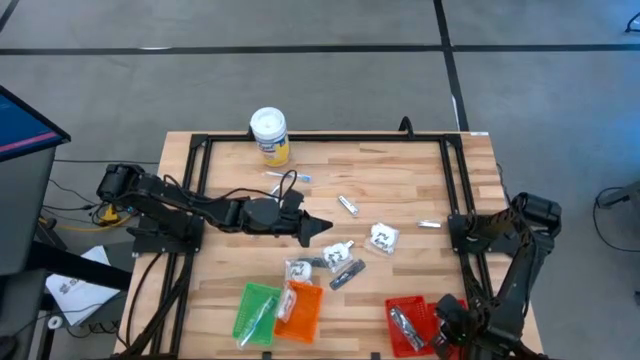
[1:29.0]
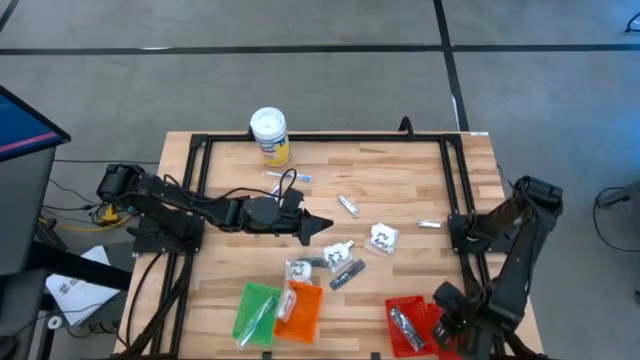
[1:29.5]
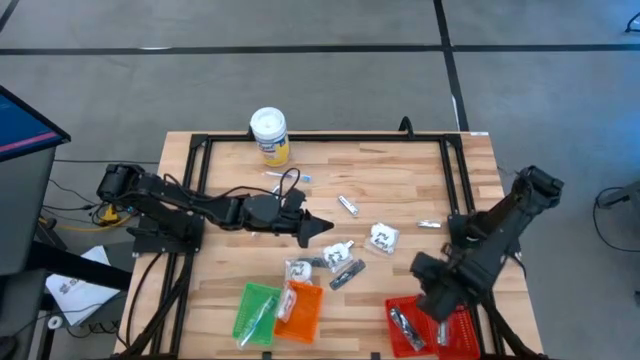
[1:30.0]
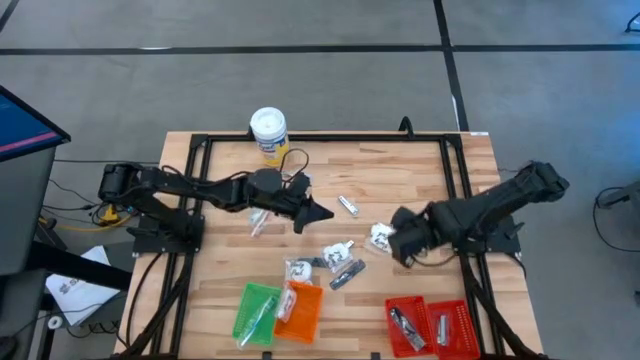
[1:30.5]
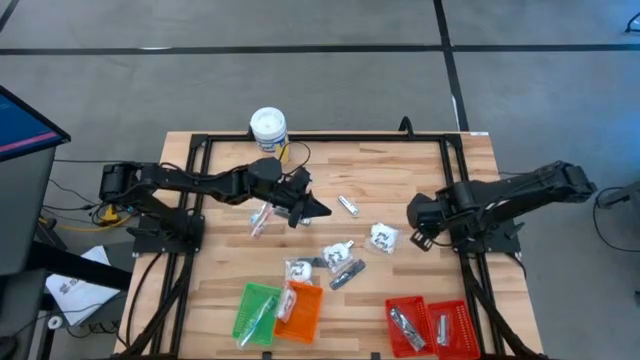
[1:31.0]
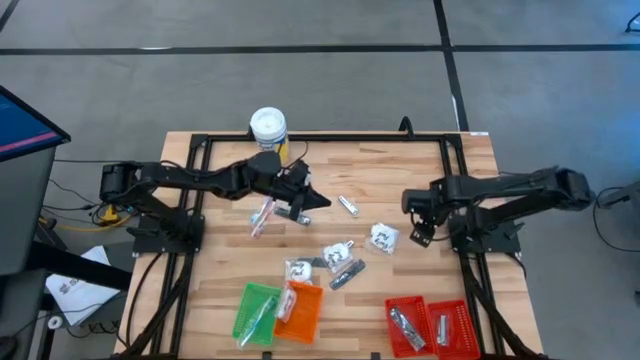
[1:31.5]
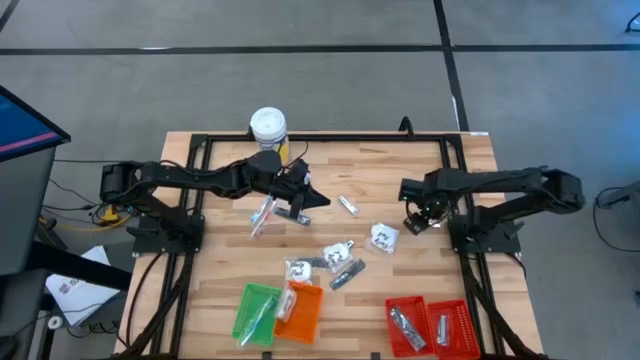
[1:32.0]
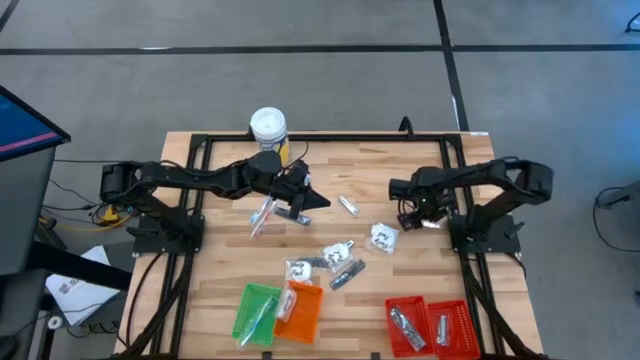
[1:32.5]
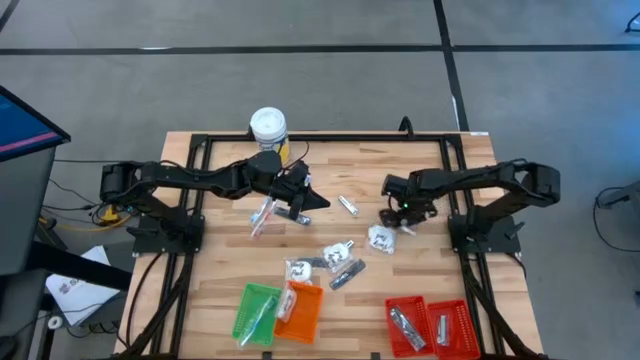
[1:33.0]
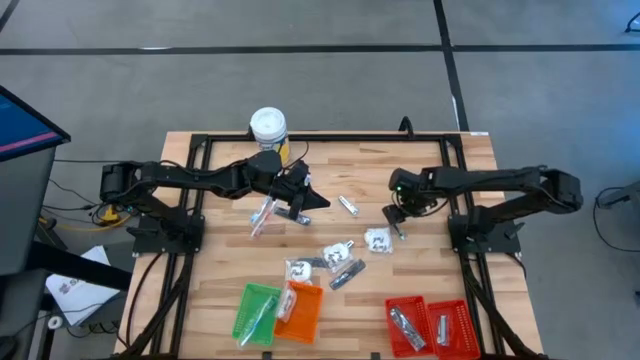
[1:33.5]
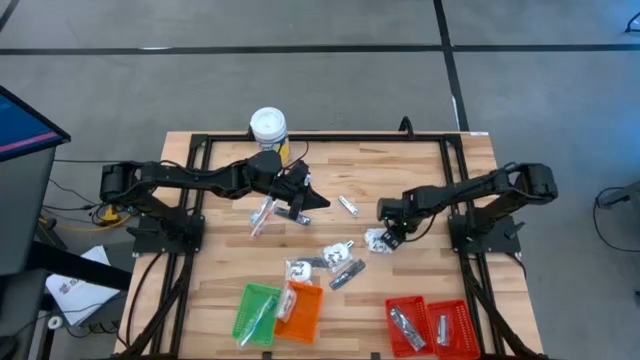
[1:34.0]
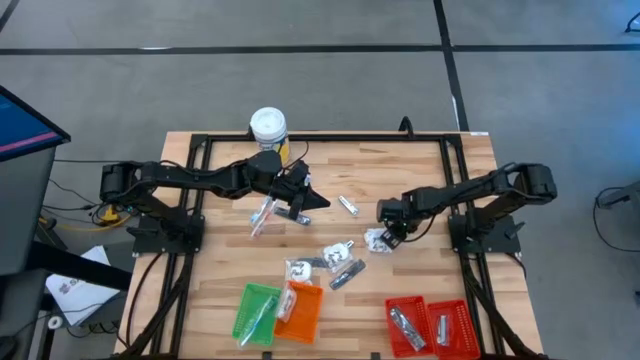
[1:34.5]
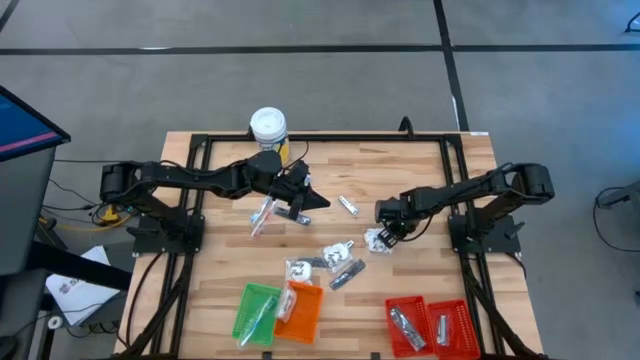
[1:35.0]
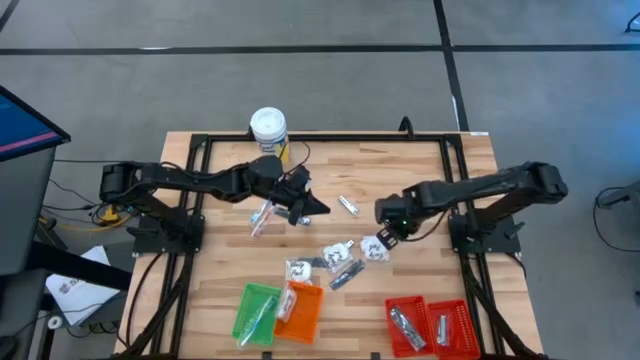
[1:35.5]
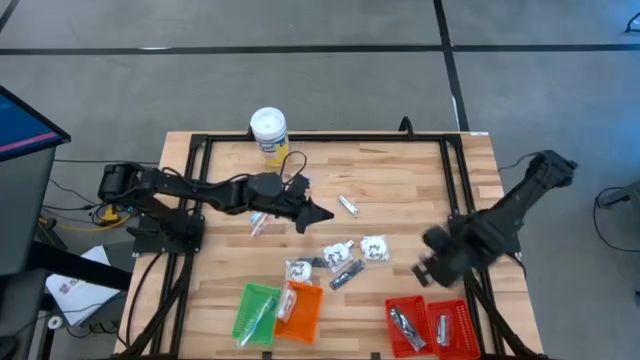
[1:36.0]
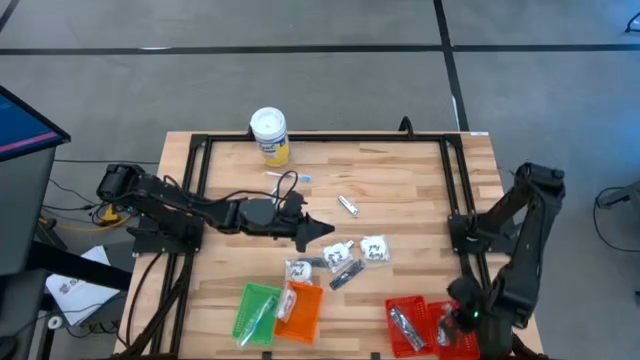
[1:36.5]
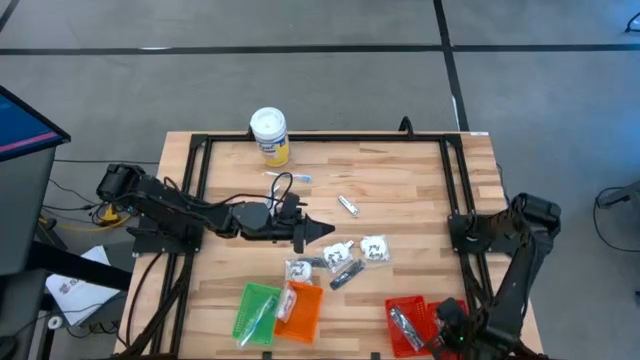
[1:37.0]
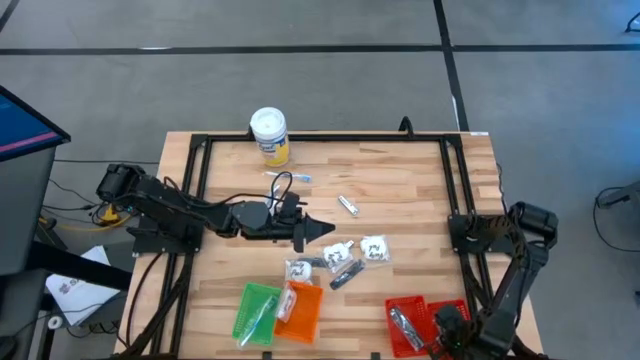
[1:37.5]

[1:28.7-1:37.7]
Task: Pick & Place Travel size toiletries
Put the silver nail cutter into the right red basket

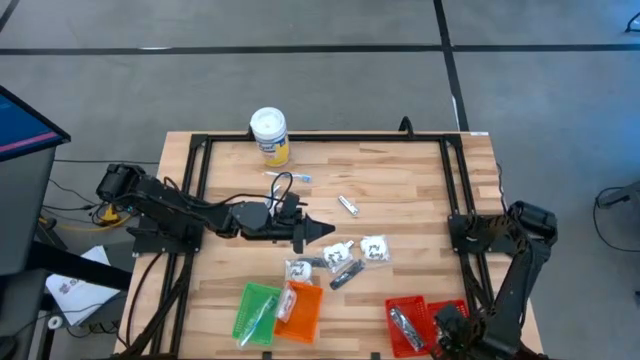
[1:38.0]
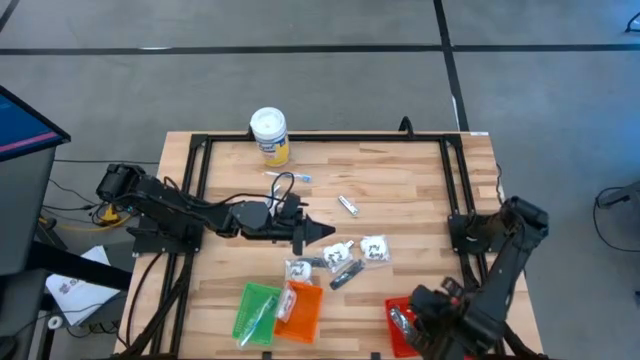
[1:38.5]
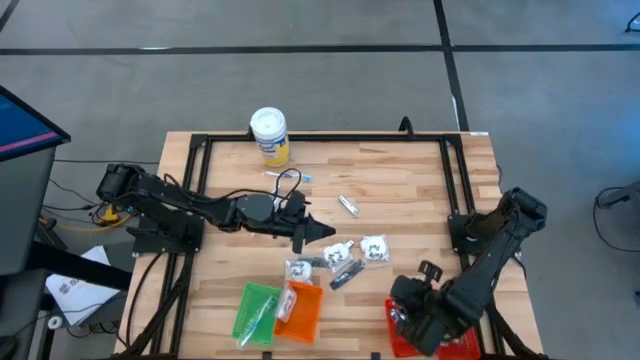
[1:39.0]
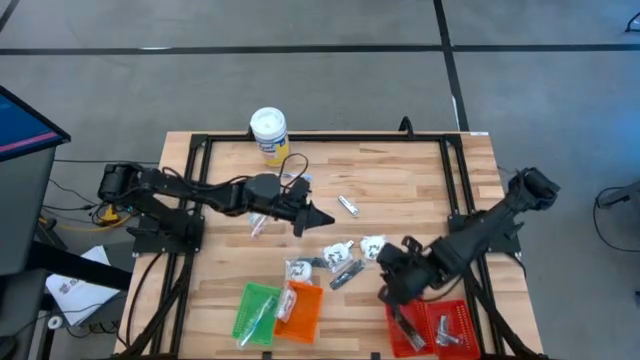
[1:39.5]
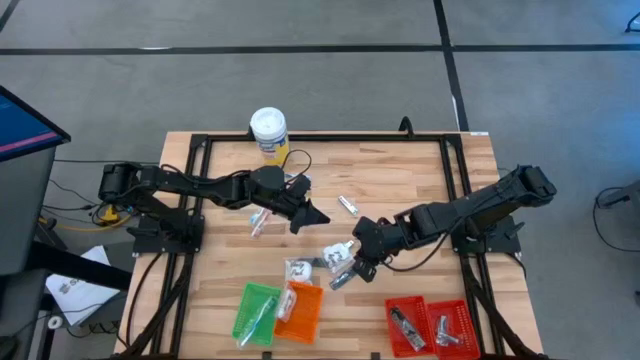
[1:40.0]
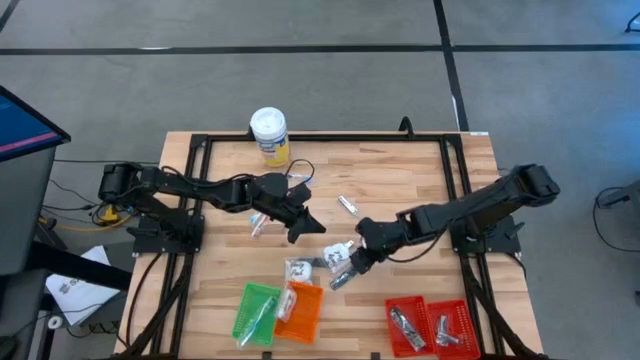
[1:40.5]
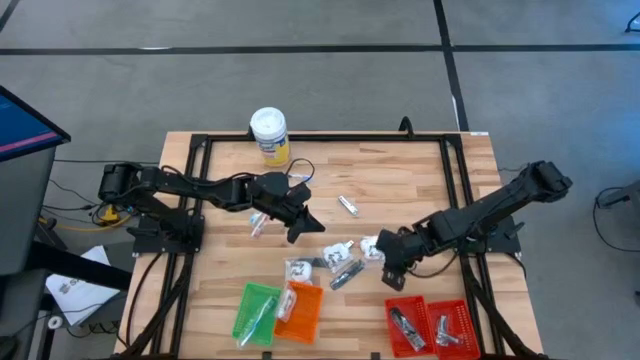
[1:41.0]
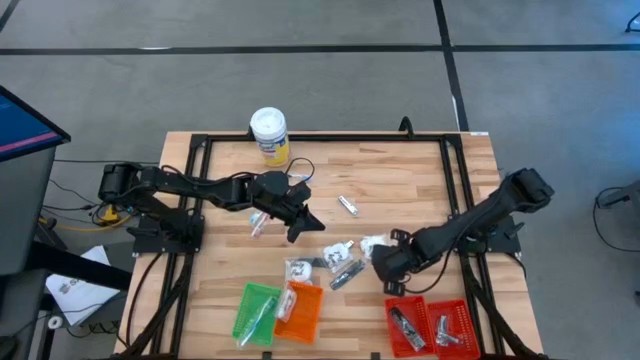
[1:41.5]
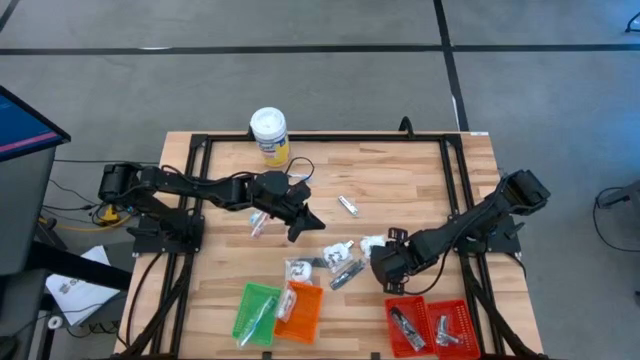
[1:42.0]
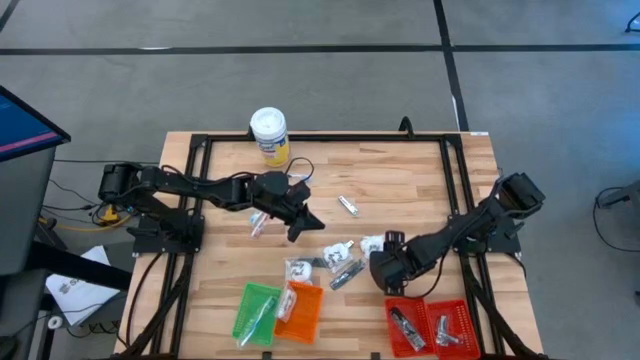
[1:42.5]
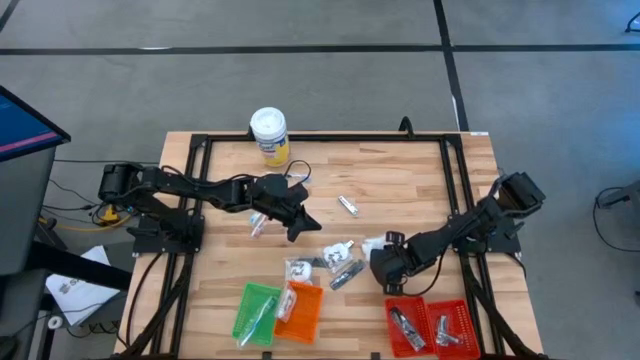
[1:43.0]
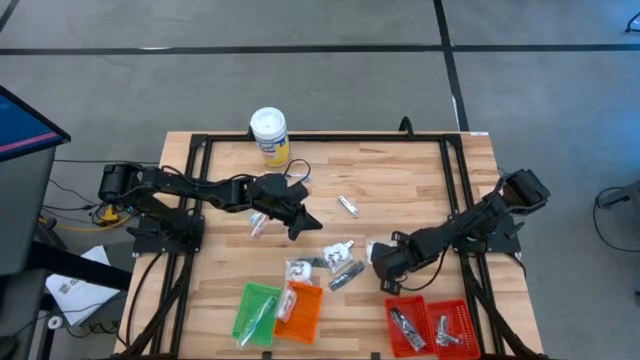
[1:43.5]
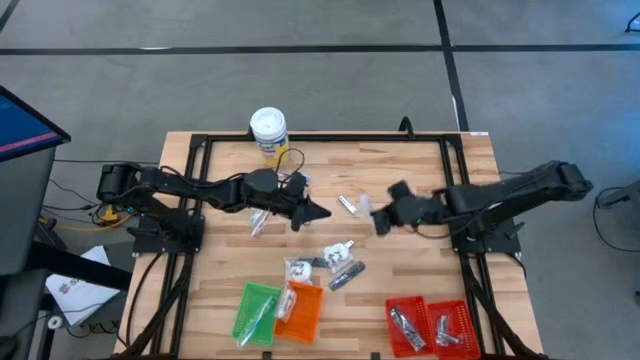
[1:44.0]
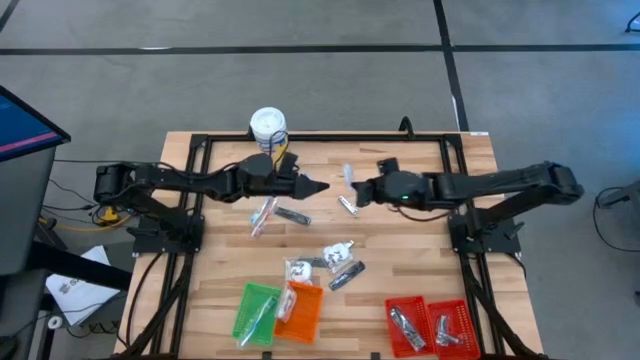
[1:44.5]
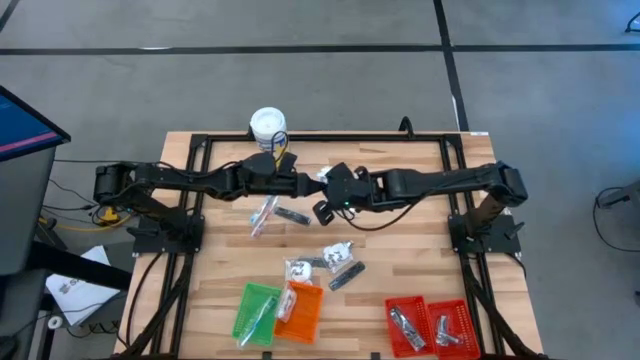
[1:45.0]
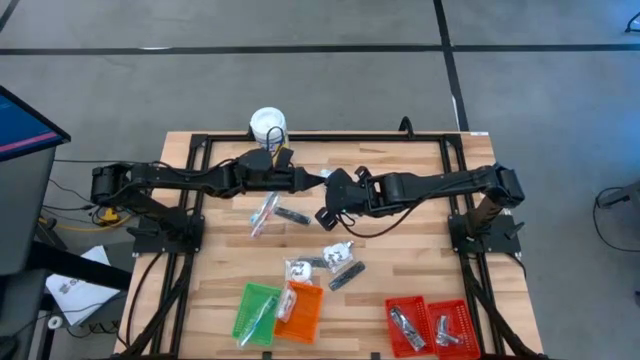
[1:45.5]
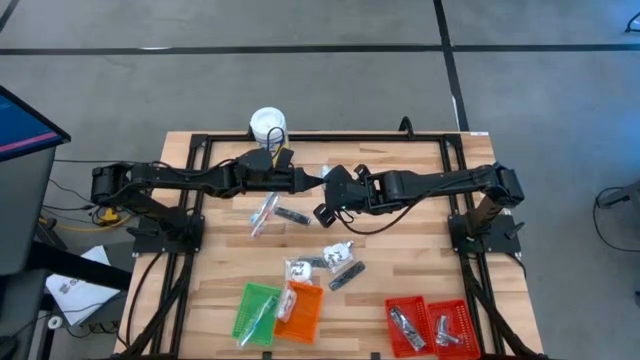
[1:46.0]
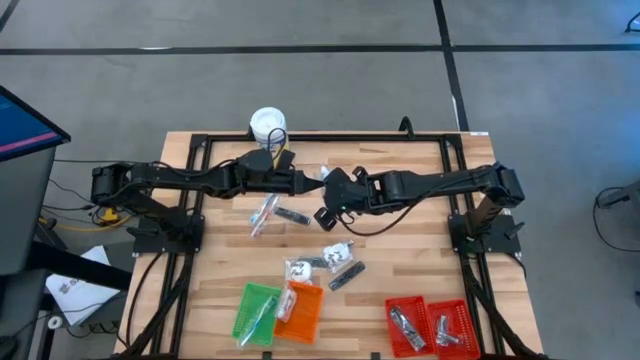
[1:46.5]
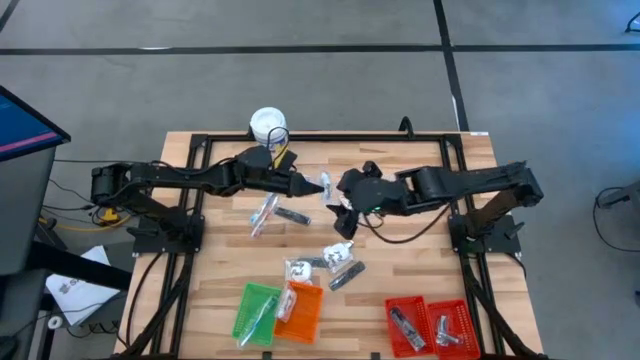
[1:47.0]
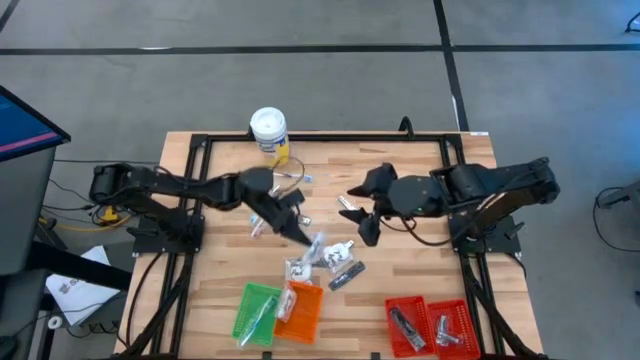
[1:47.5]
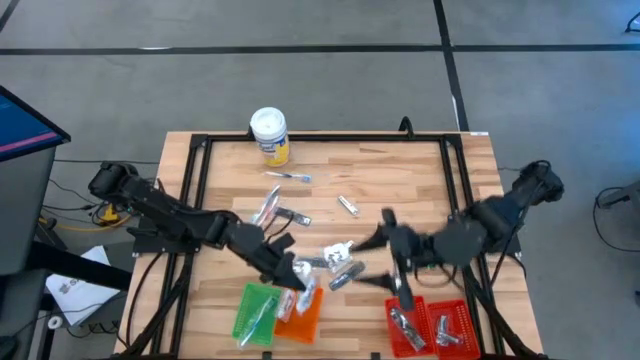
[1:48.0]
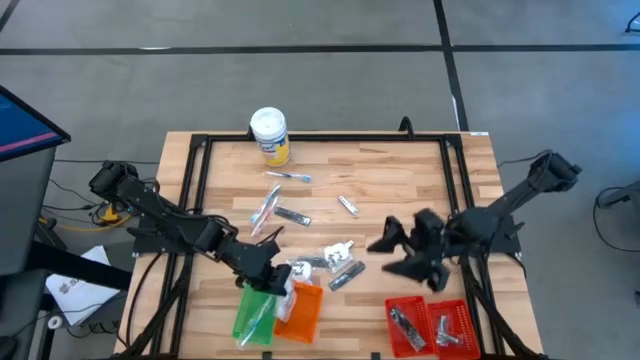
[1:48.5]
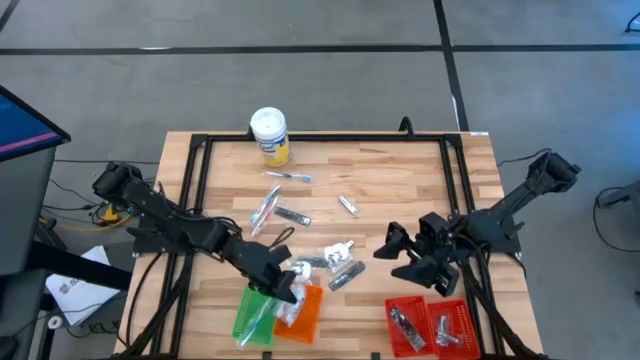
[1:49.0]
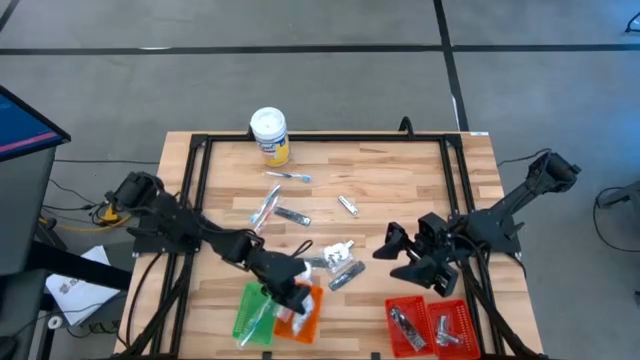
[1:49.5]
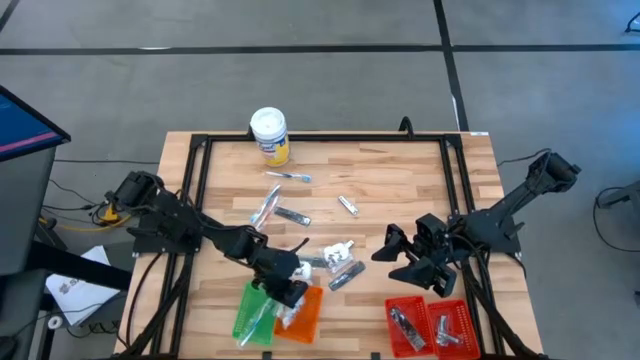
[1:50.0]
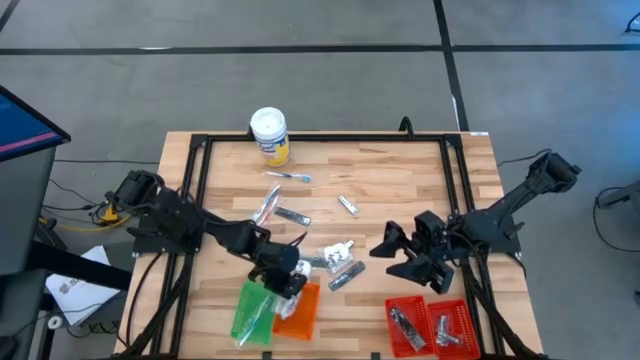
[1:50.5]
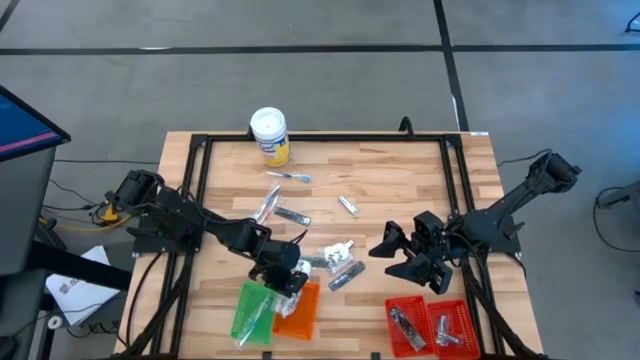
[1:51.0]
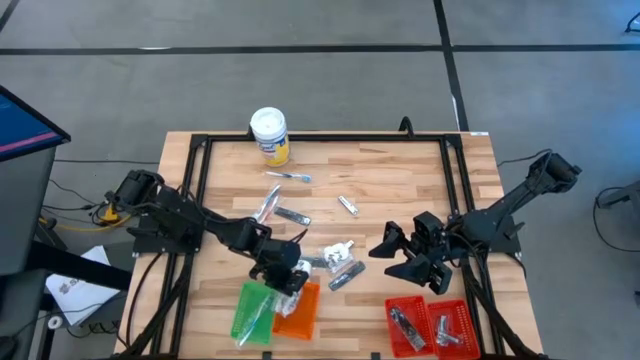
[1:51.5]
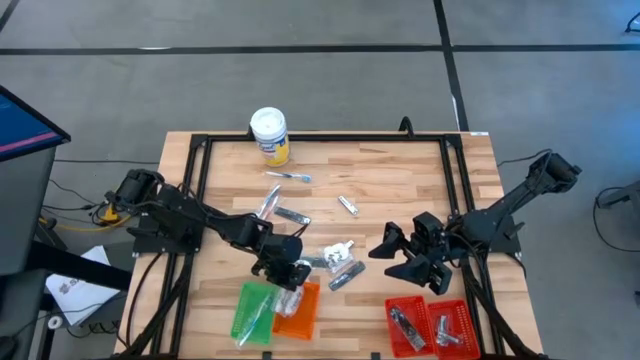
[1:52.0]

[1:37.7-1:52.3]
Put the white vanity pack into the orange basket
